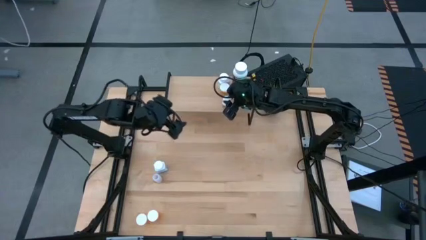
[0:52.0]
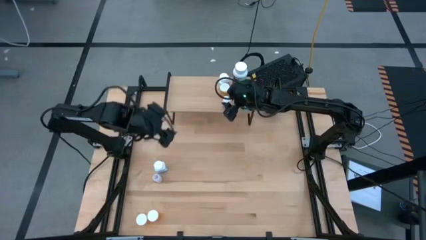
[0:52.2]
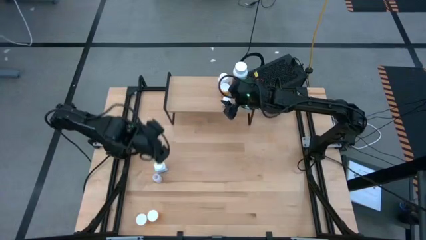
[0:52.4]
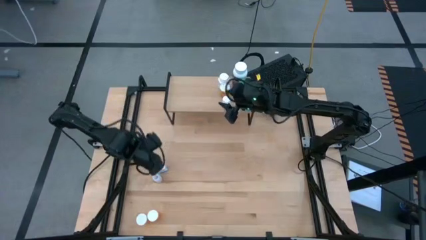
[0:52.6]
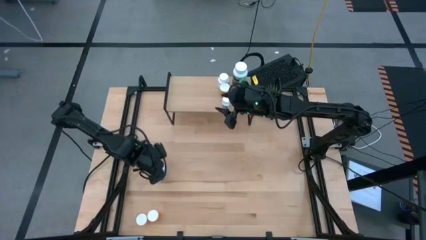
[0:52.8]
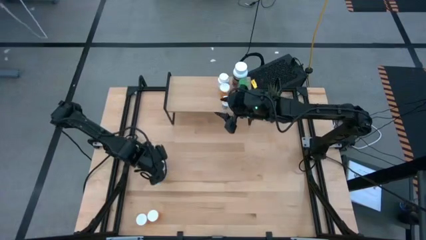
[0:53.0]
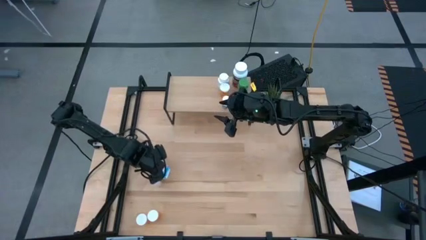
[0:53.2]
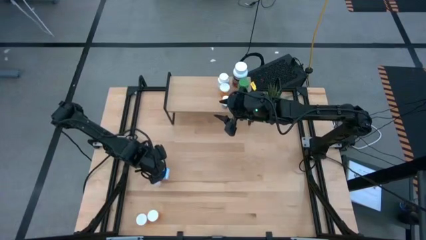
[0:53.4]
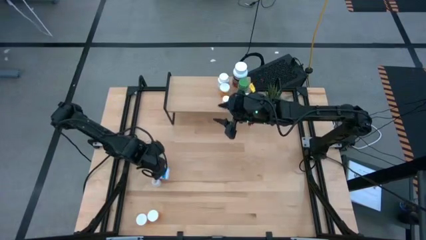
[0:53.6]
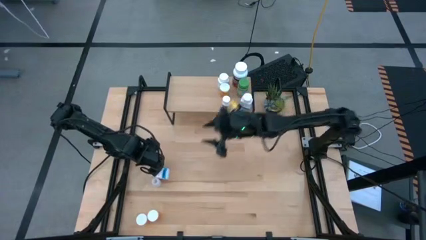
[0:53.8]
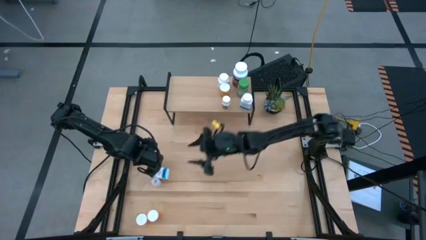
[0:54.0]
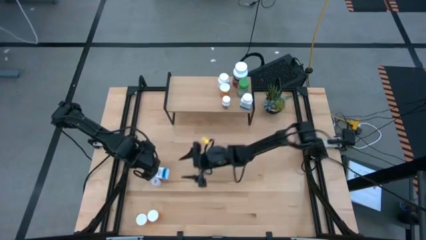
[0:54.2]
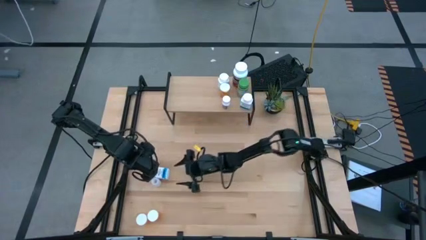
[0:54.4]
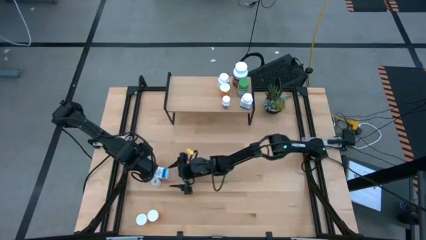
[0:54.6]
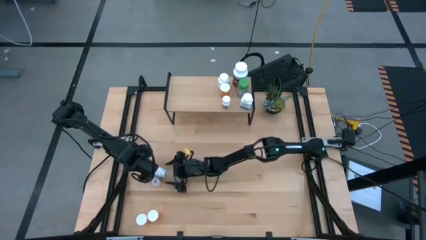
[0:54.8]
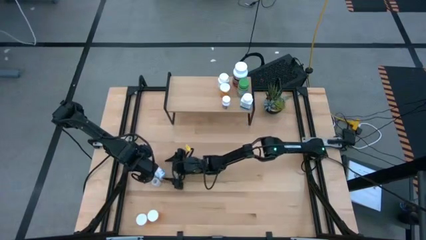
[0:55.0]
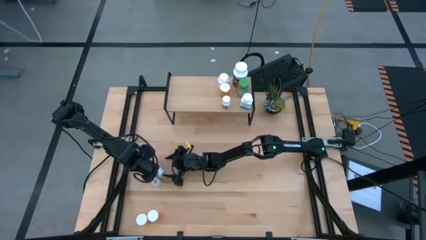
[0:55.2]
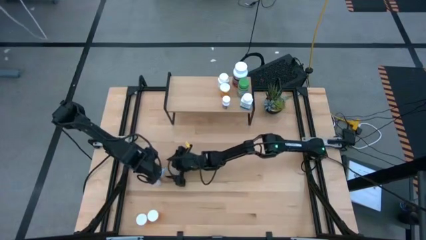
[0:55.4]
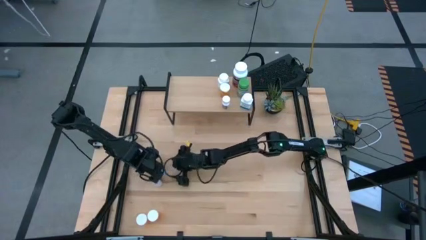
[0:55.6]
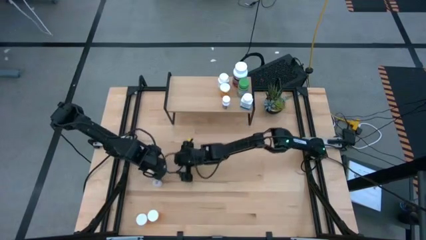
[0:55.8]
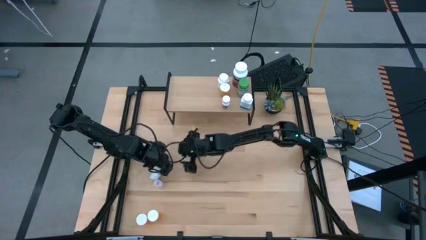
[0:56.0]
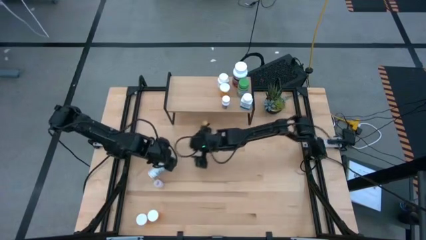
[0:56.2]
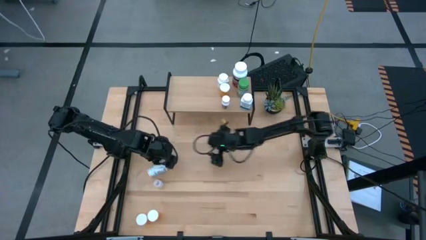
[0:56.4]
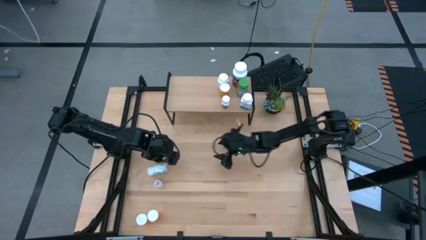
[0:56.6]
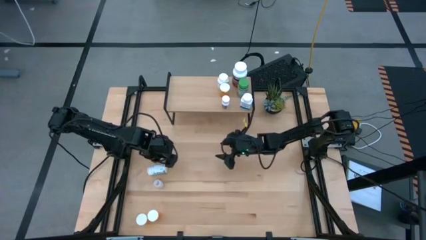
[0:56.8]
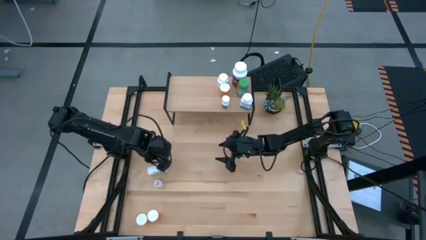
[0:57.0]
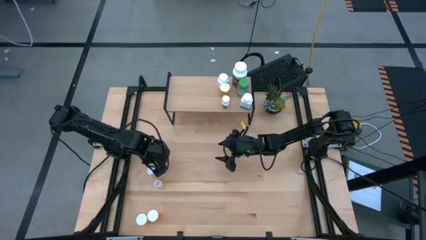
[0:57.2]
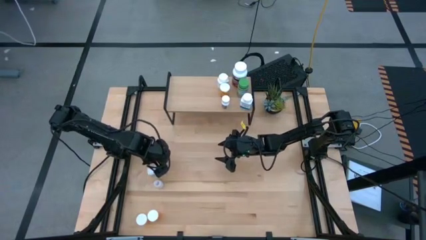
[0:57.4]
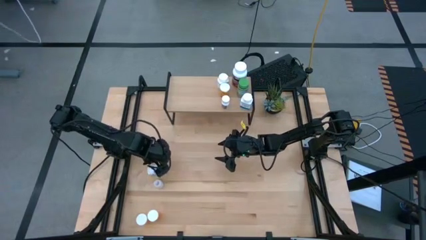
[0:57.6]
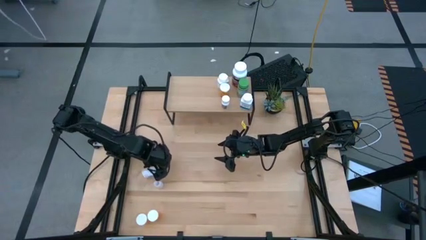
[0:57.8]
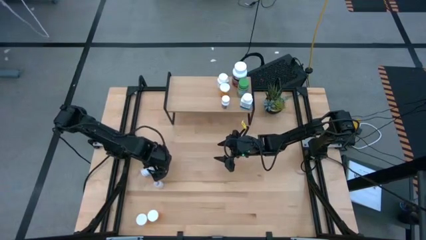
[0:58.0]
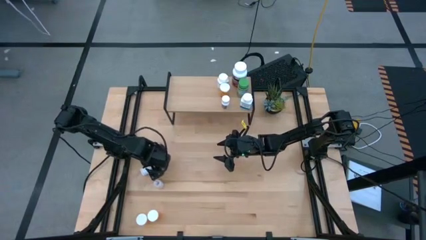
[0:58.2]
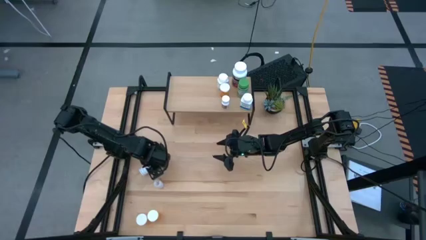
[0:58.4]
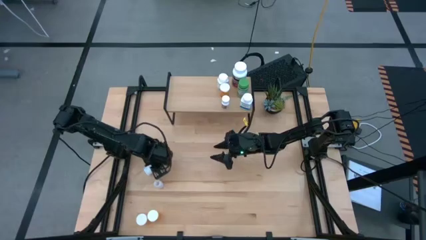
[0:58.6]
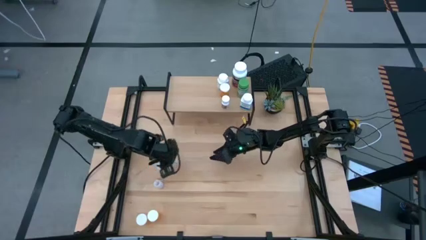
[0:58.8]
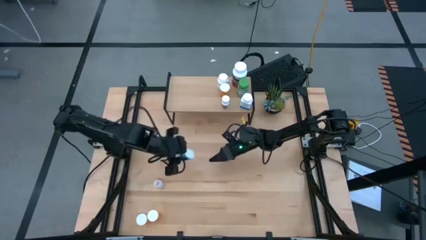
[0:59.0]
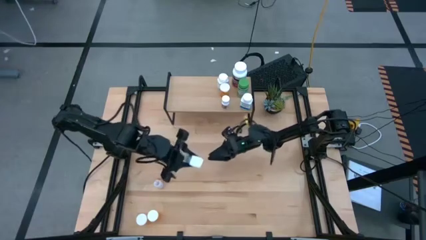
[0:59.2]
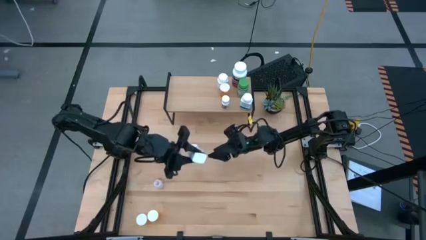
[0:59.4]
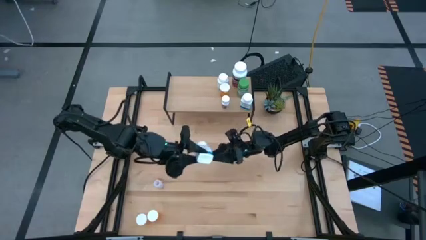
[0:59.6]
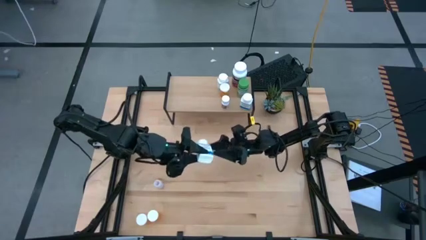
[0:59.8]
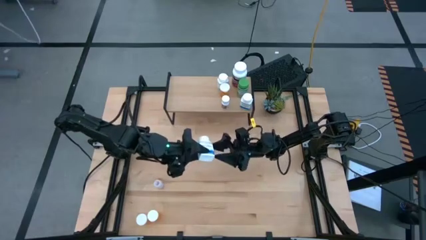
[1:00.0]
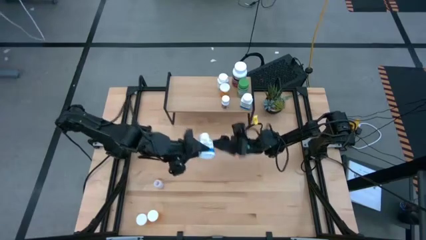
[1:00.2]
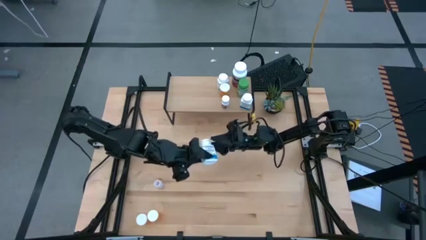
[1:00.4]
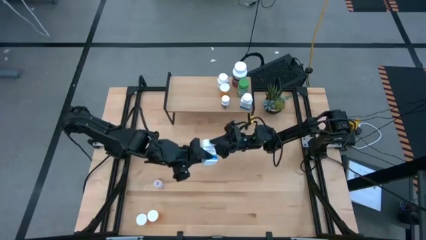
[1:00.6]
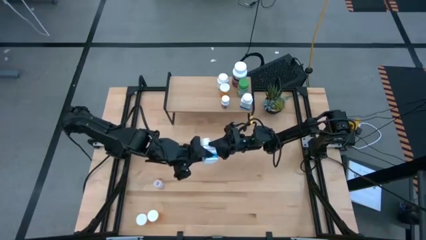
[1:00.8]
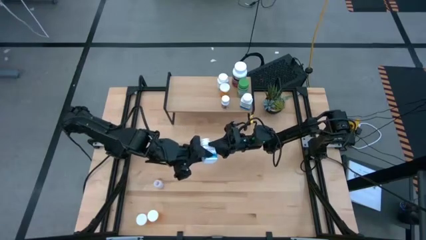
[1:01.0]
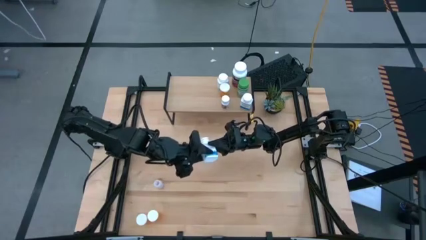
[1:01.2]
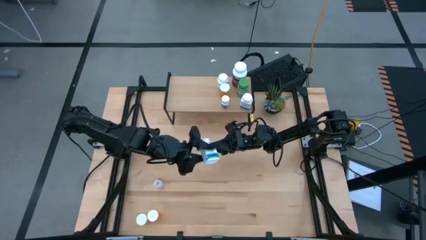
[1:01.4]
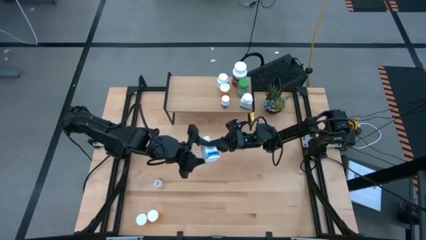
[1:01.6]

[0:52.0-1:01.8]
Task: Pick and place medicine bottles onto shelf by color
Put the white medicine bottle on the shelf

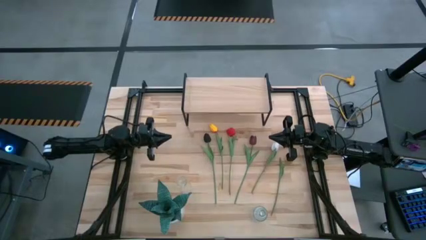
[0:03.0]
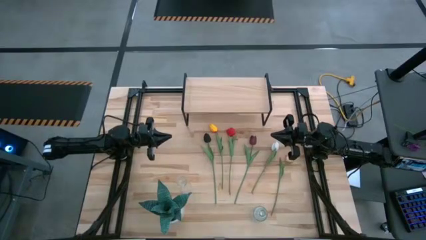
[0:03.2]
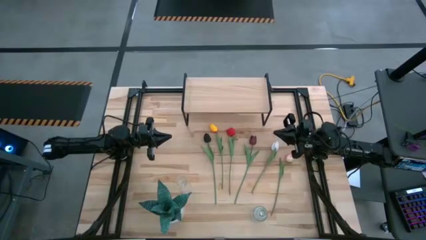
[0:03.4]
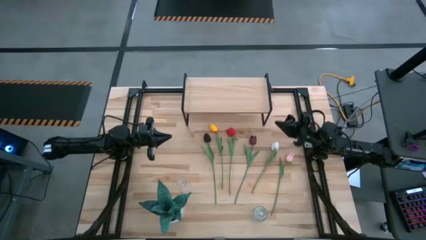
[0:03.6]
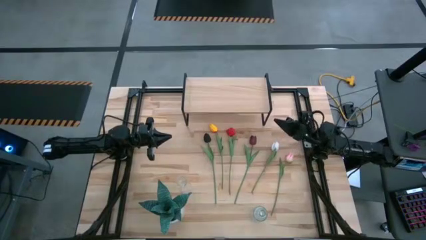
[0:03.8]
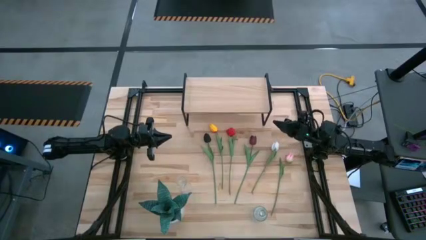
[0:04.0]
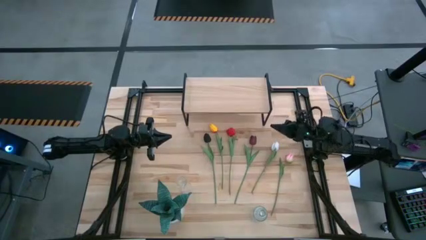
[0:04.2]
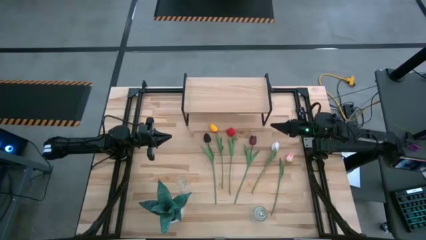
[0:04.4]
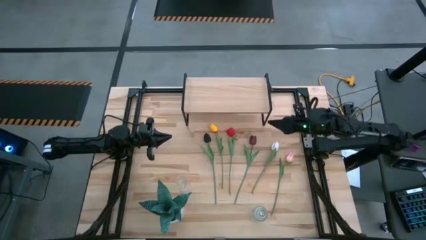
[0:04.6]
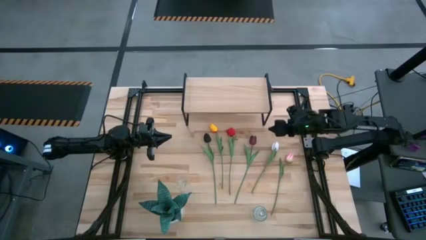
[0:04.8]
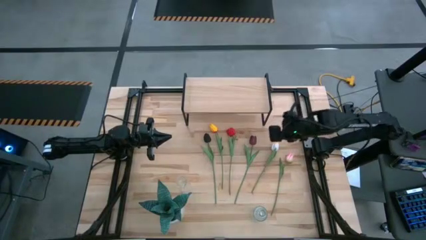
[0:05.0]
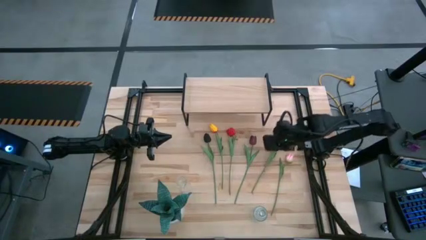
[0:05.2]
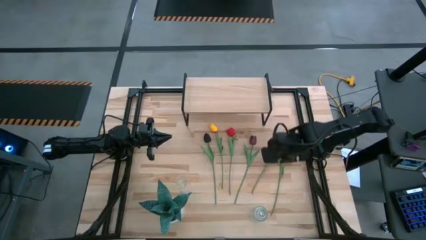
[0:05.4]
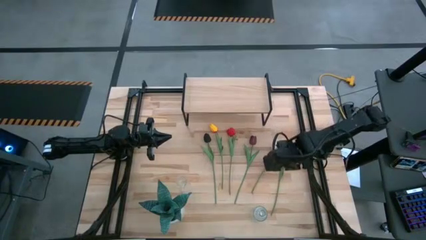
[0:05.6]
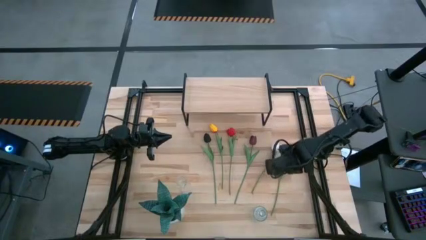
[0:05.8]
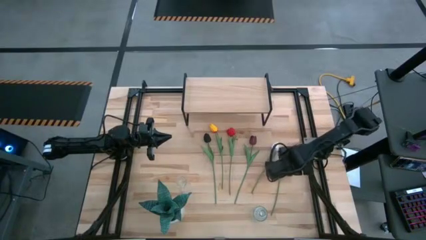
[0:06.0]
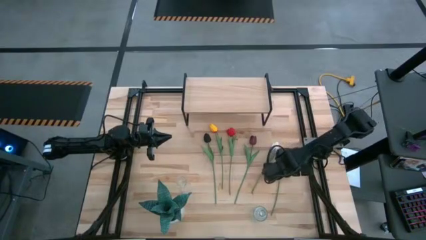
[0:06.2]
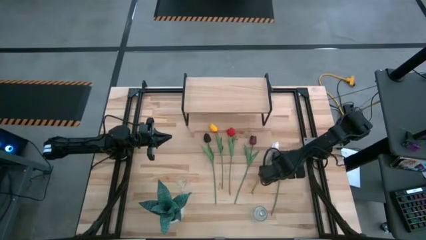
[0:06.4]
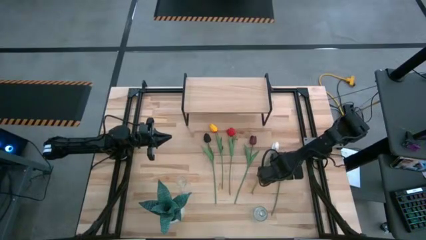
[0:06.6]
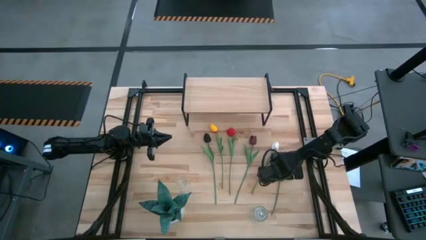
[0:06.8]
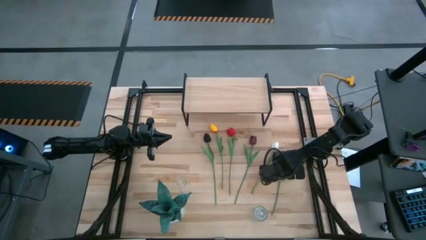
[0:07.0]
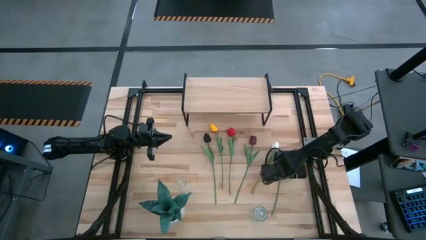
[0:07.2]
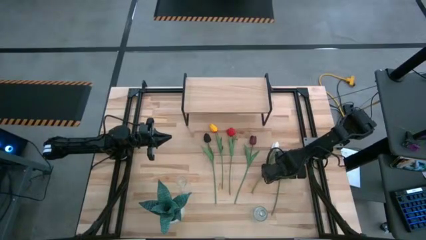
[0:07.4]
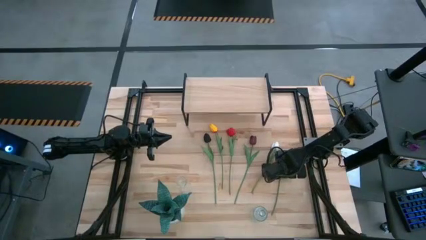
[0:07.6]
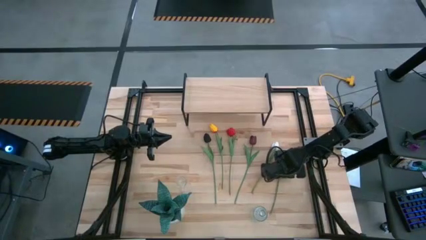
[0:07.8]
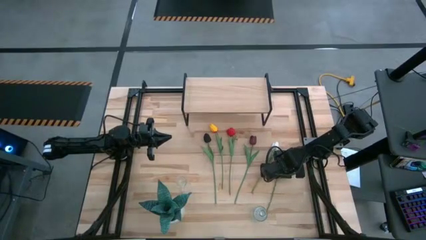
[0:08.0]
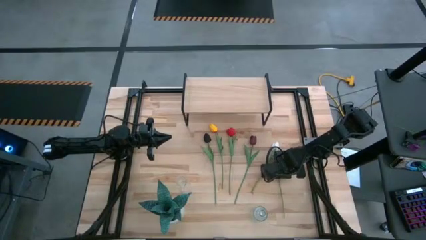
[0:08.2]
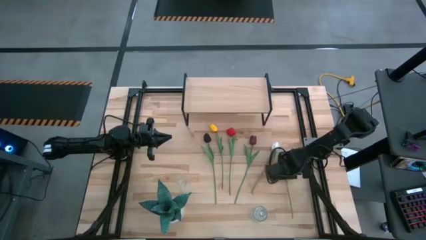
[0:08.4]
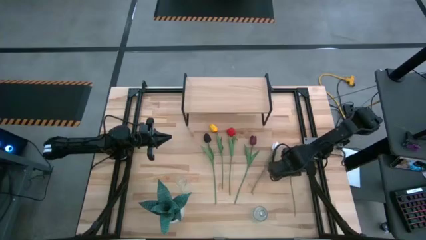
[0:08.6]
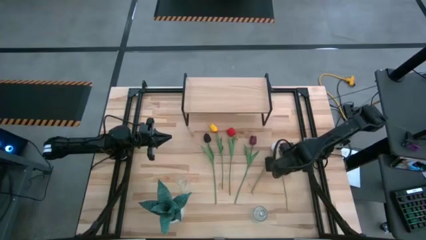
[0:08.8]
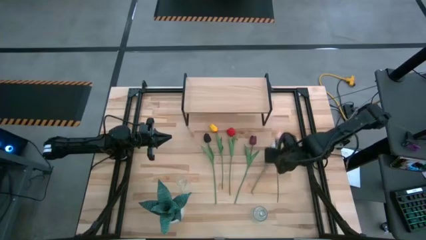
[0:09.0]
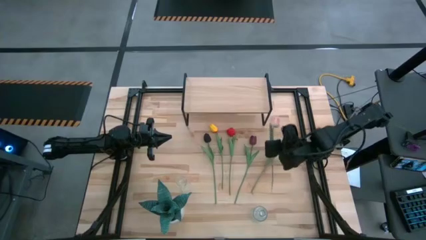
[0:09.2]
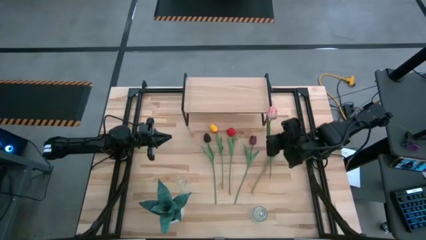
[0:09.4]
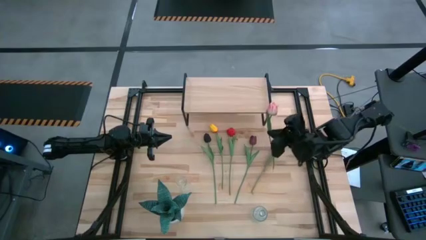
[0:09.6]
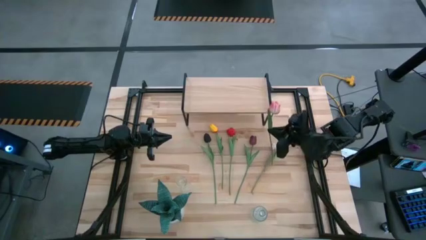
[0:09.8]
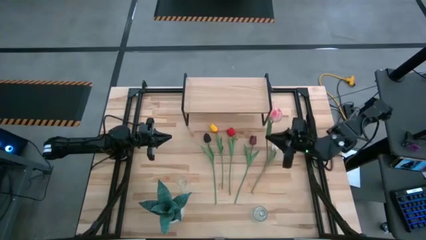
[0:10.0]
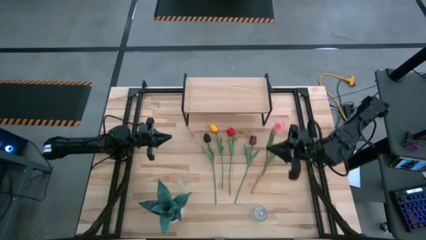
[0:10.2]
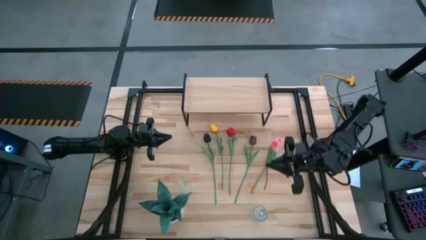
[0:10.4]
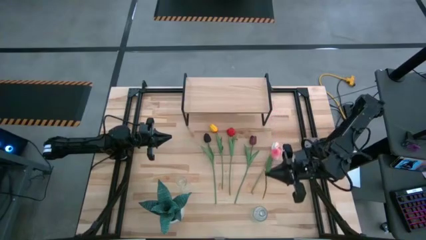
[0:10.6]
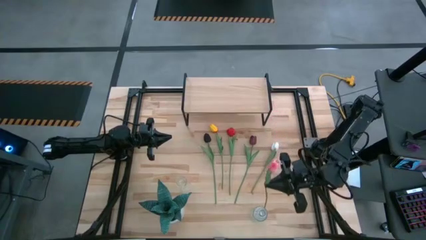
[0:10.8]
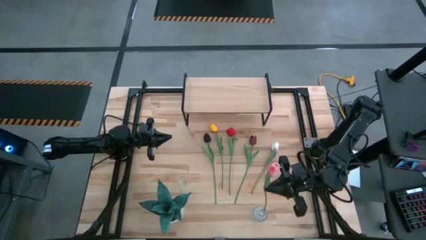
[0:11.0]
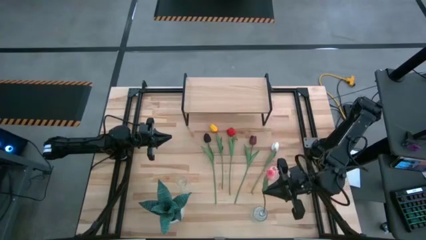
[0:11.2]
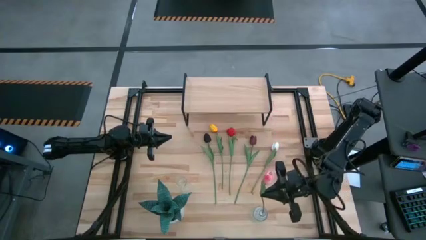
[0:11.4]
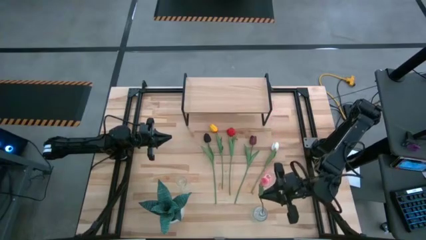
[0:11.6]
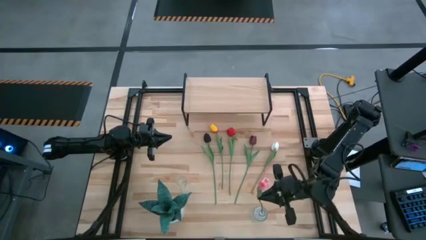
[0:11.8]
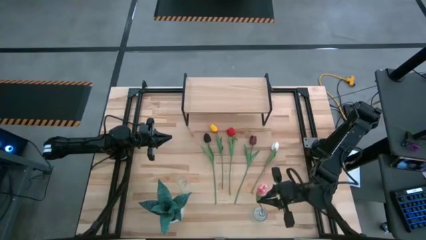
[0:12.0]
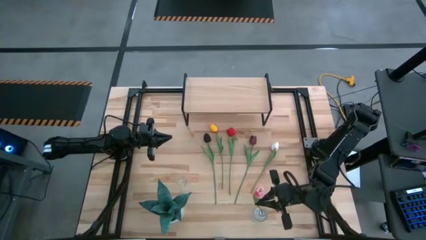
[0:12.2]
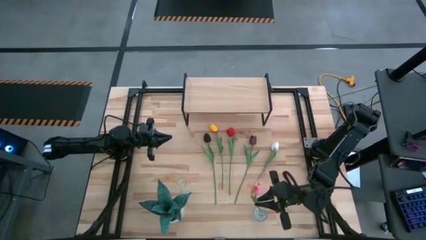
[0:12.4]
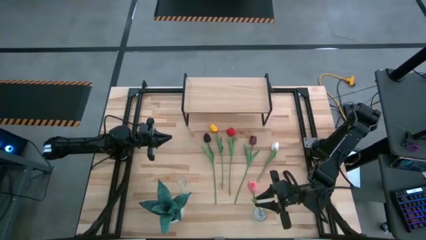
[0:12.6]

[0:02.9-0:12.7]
Task: Pick and place flowers into a vace then onto a shelf
Put the pink flower into the bottom transparent vase
